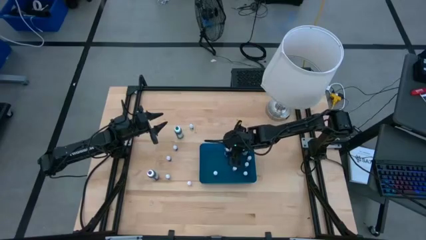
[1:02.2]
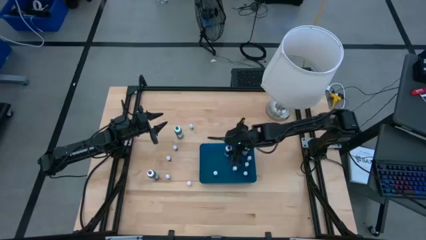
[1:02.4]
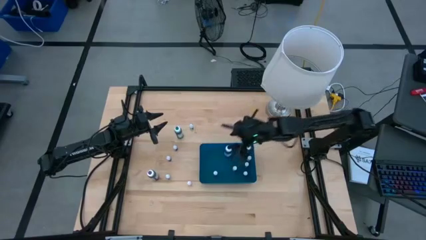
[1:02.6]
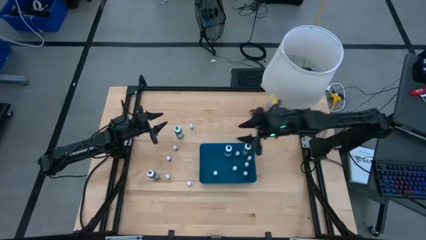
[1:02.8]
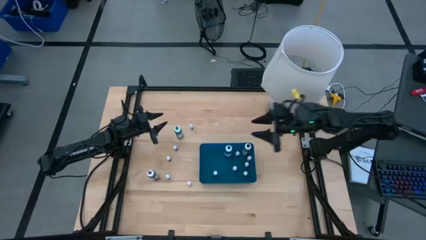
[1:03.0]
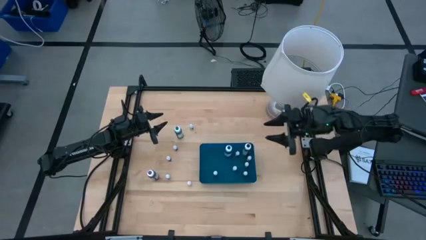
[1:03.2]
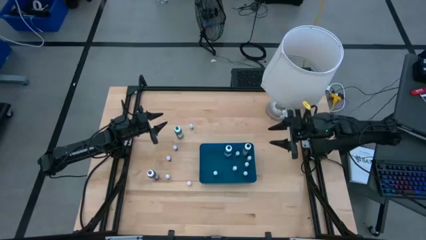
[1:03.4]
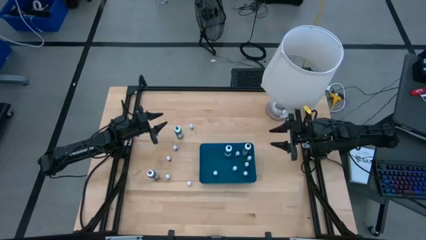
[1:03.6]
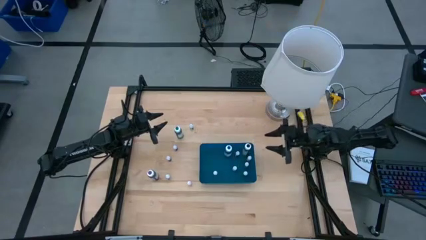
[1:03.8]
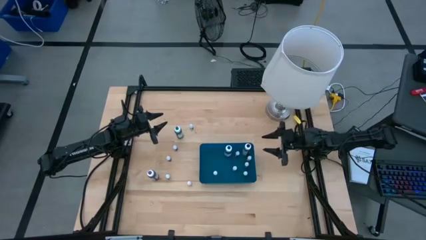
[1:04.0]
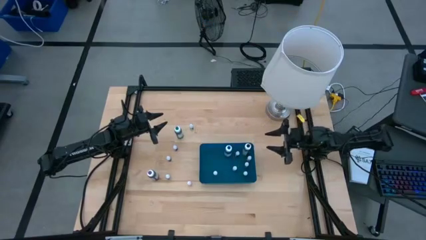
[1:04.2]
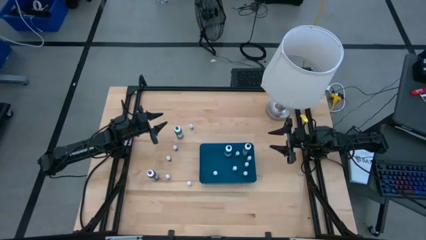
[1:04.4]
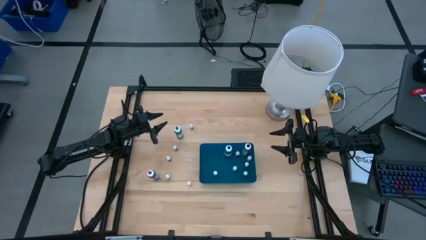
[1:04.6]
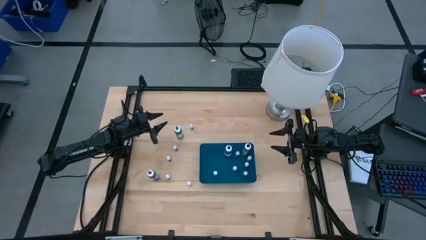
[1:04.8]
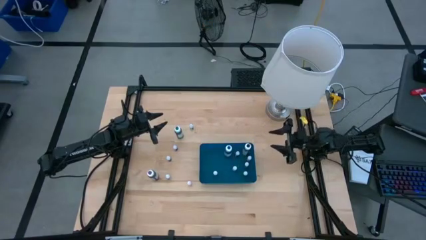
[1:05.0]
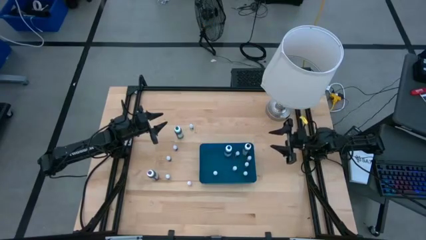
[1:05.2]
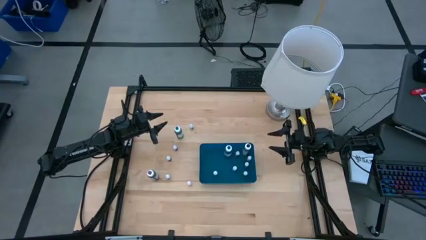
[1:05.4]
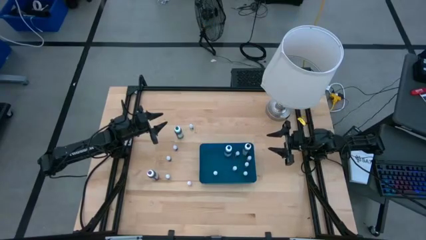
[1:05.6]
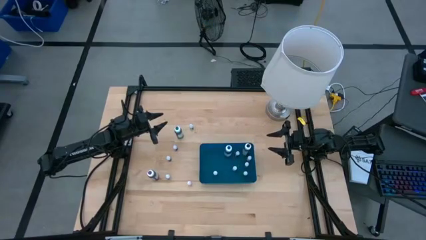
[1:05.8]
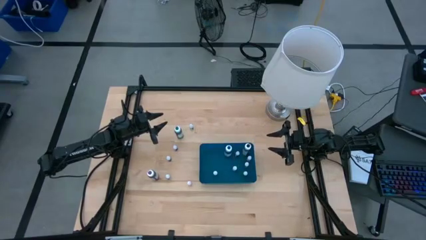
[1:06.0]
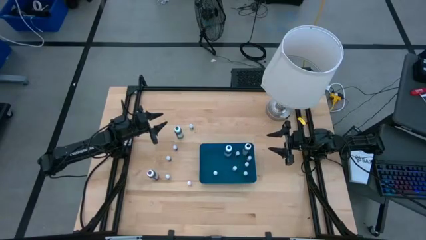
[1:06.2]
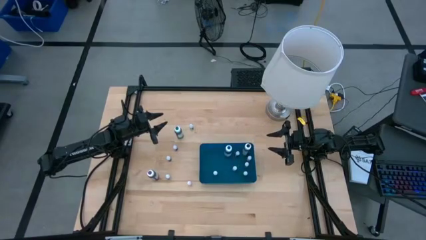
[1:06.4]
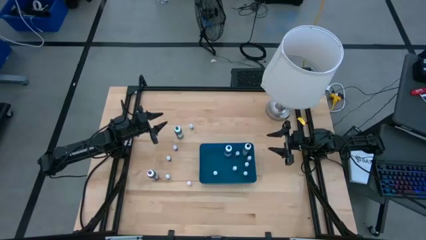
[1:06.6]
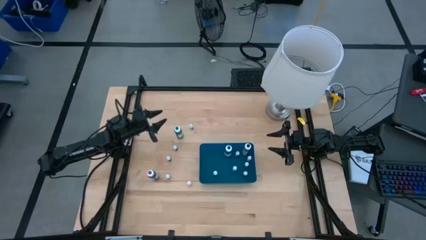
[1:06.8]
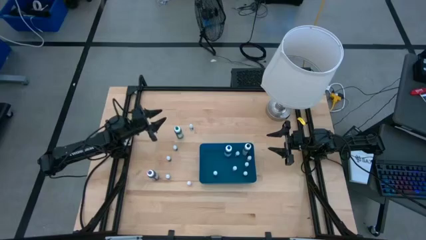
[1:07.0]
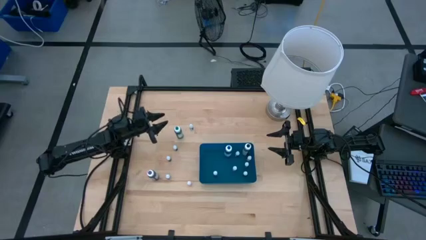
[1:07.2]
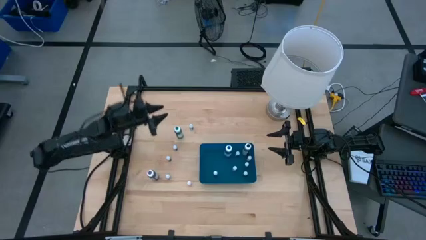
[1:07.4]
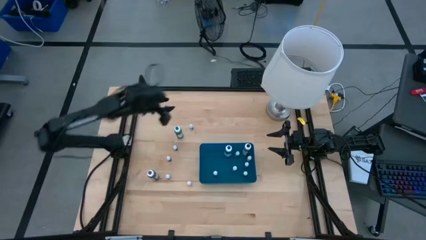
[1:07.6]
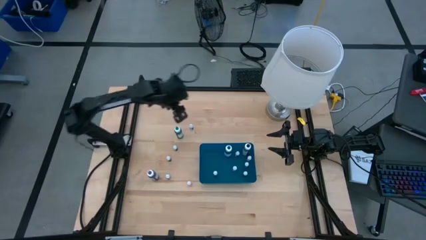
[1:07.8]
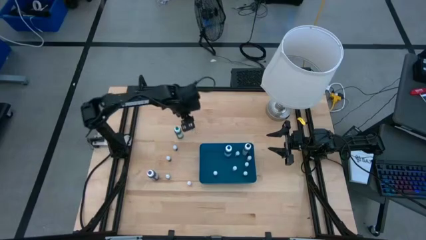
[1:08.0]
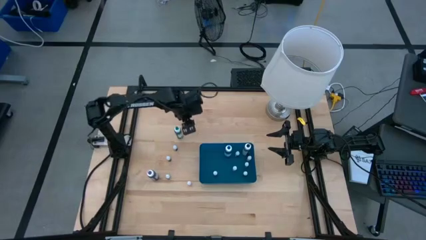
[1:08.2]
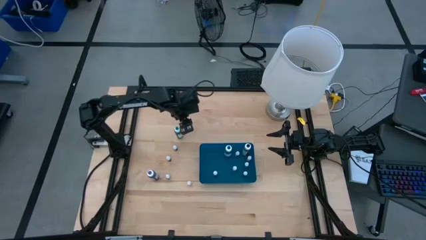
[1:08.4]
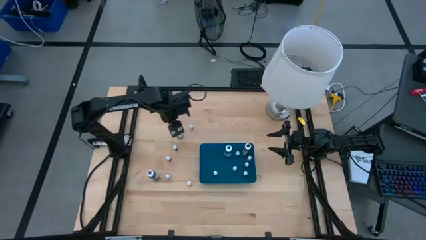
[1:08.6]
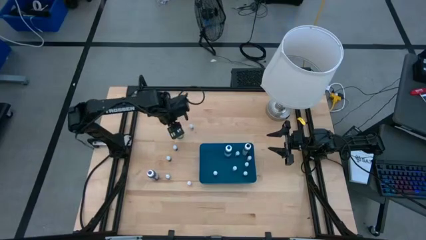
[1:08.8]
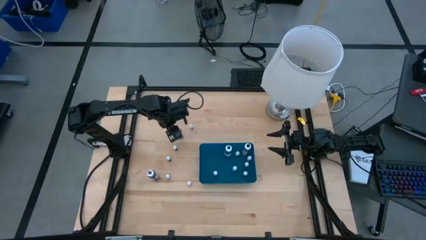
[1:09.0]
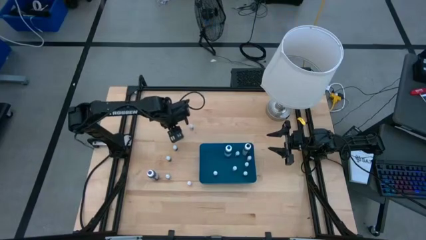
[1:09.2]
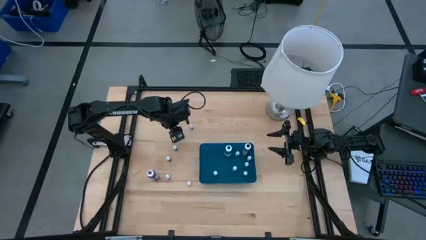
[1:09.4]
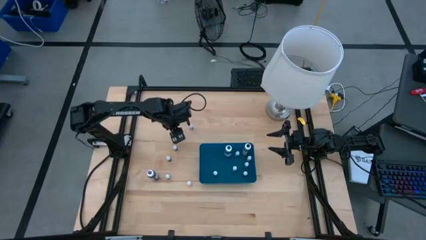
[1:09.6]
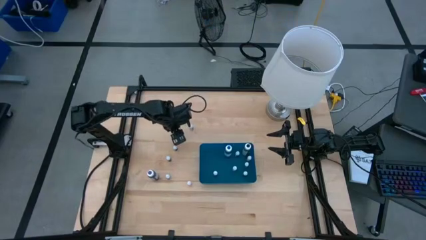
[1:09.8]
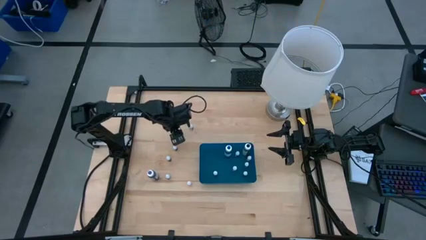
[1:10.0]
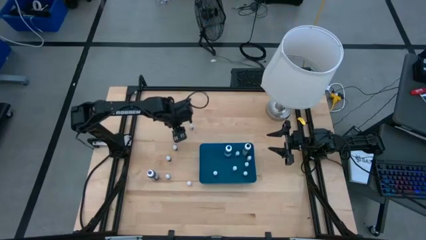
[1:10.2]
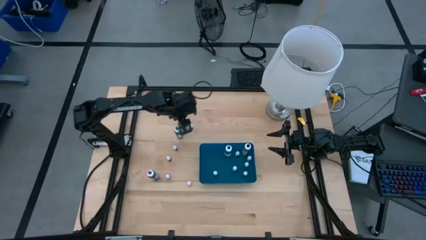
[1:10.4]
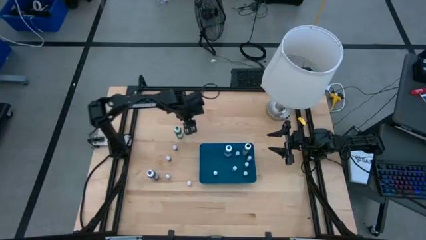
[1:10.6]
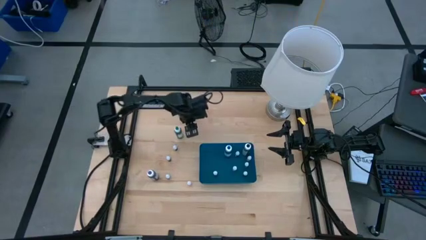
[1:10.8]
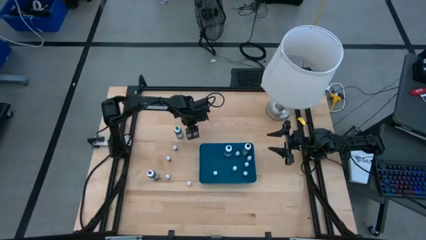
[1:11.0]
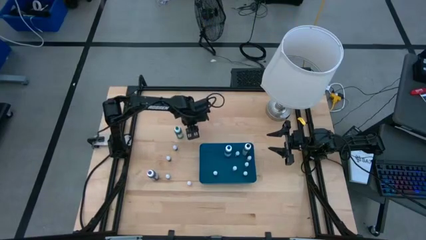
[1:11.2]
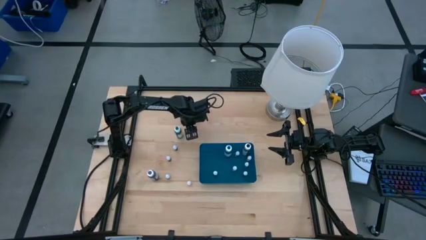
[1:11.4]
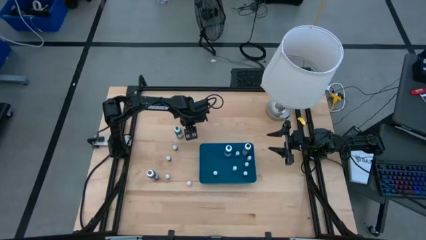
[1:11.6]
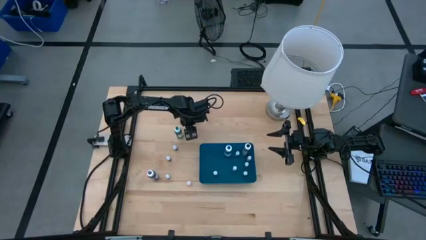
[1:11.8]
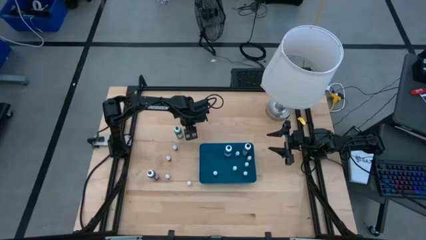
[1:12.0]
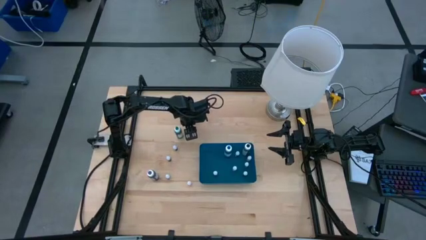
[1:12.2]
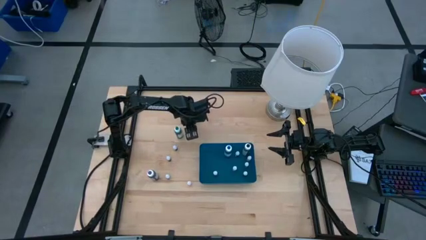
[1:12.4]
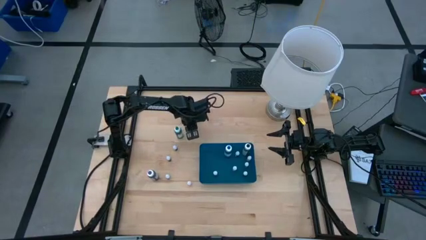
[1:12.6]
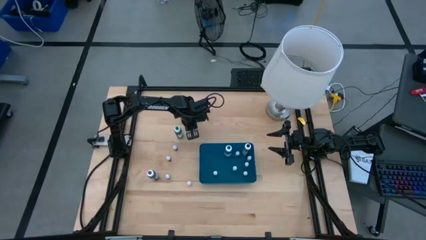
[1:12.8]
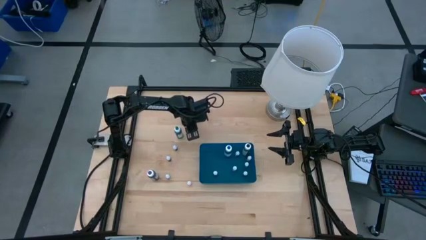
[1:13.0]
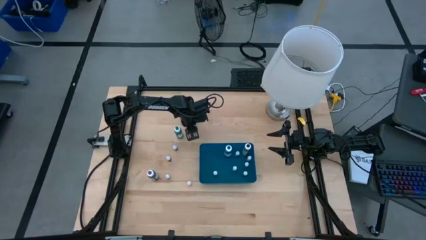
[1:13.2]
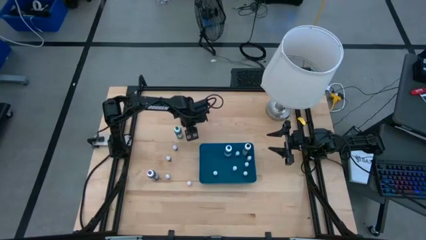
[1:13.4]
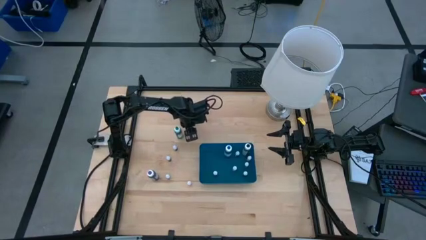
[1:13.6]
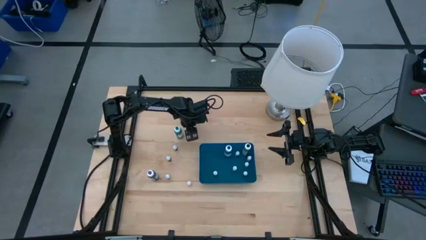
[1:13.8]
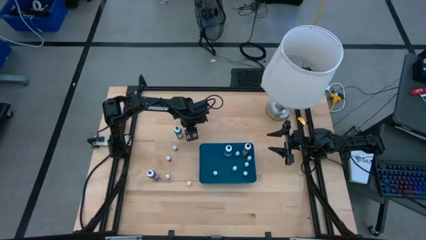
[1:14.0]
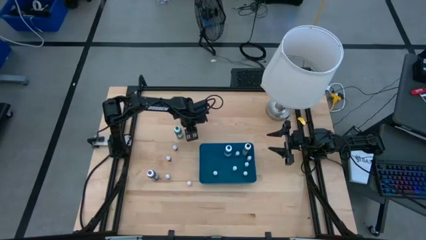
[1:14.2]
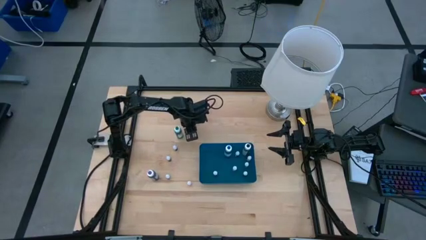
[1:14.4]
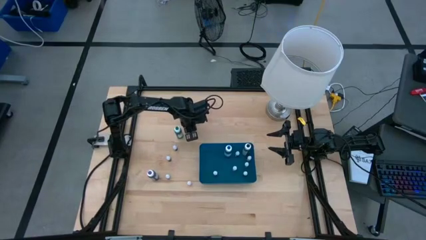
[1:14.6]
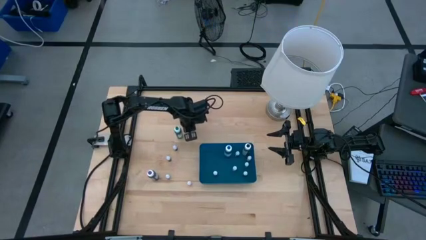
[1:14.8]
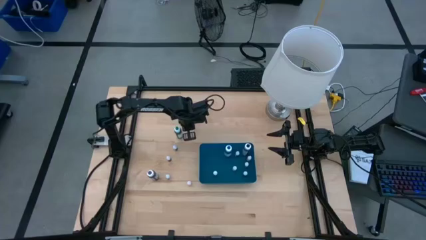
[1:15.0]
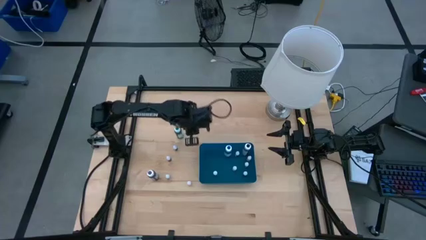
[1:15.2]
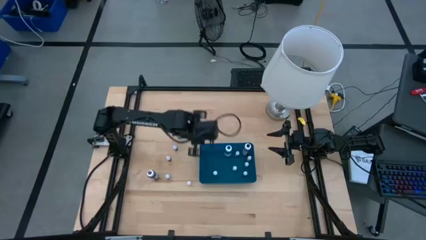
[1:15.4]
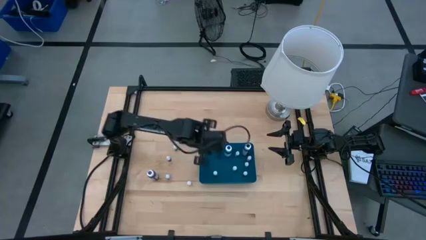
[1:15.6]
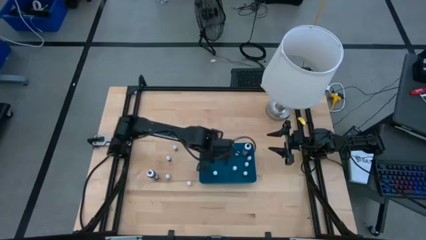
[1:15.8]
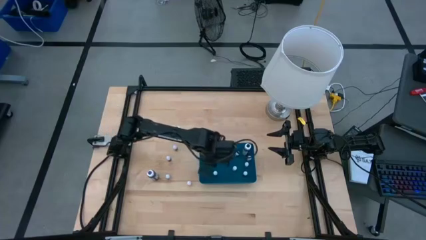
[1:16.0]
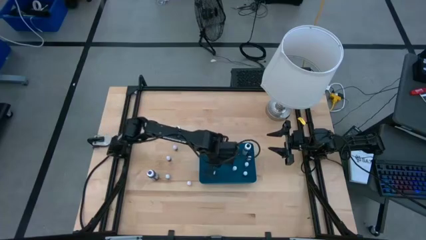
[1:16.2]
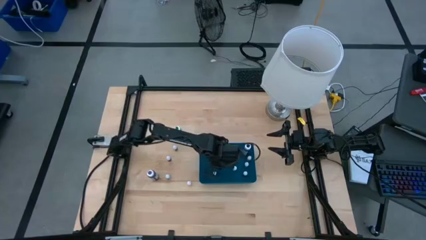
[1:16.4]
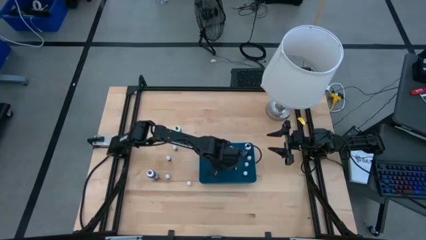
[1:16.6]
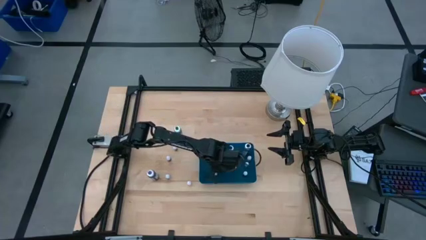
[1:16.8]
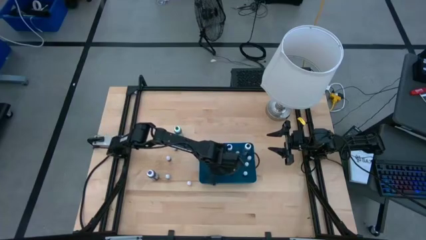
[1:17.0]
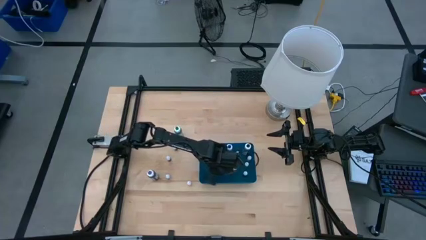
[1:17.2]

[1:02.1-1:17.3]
Task: Pick & Place food coloring
Put the small black food coloring bottle into the blue bin
